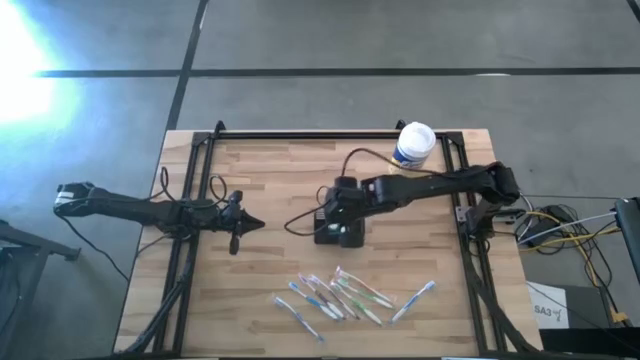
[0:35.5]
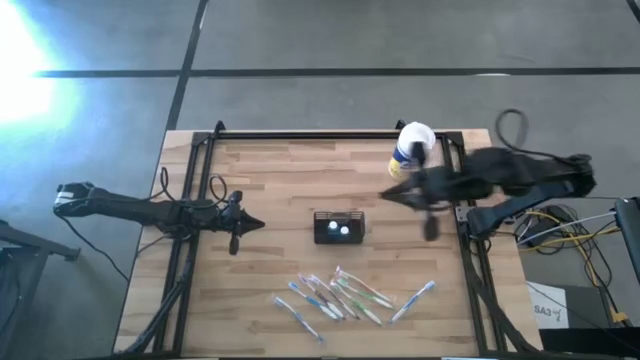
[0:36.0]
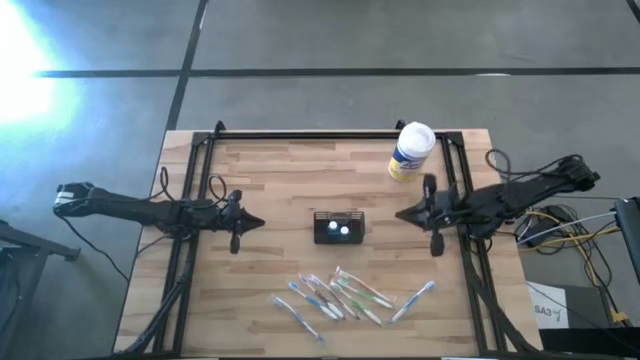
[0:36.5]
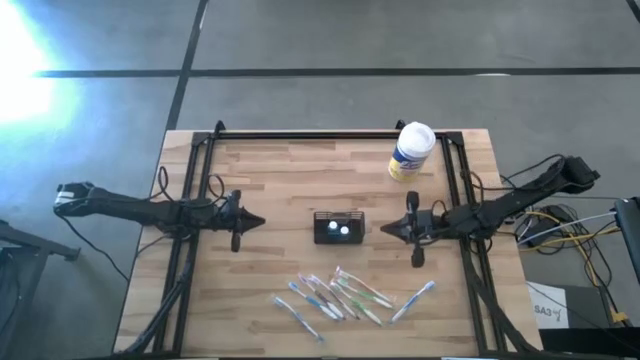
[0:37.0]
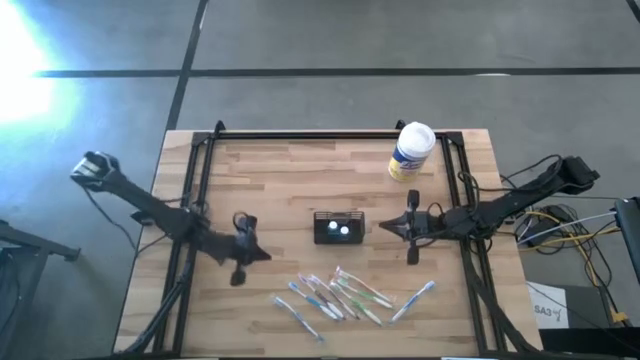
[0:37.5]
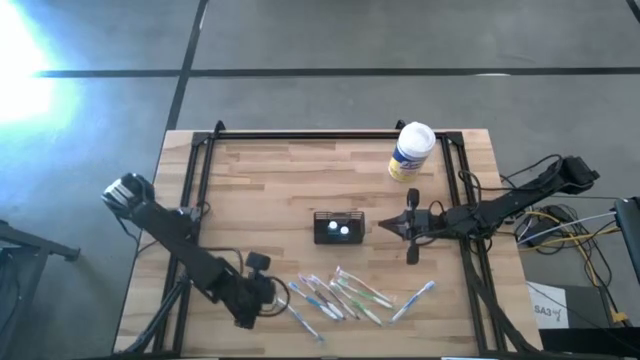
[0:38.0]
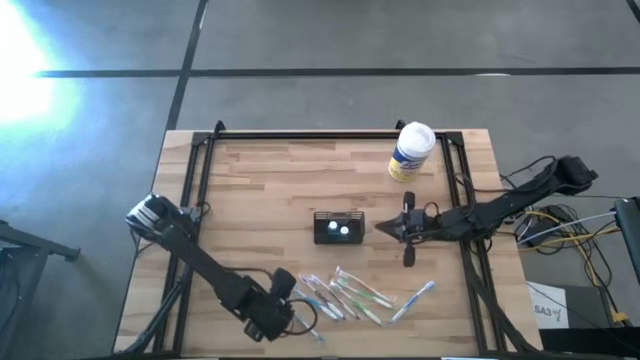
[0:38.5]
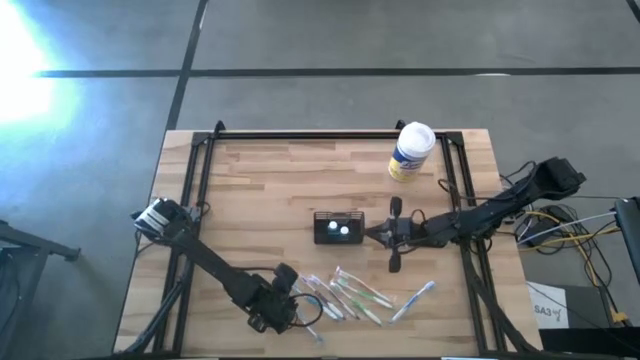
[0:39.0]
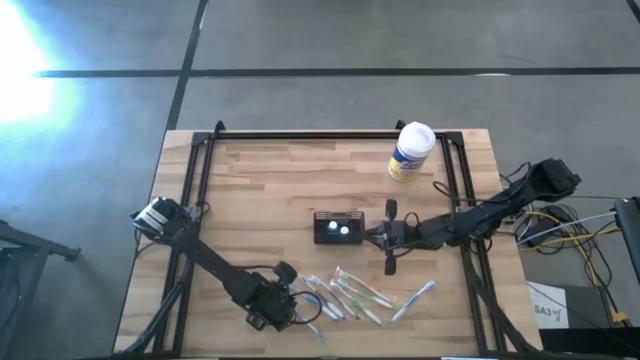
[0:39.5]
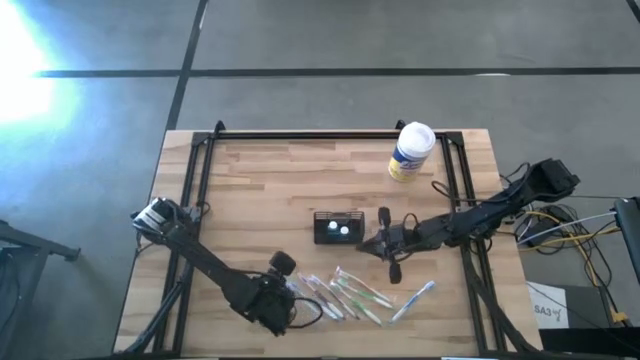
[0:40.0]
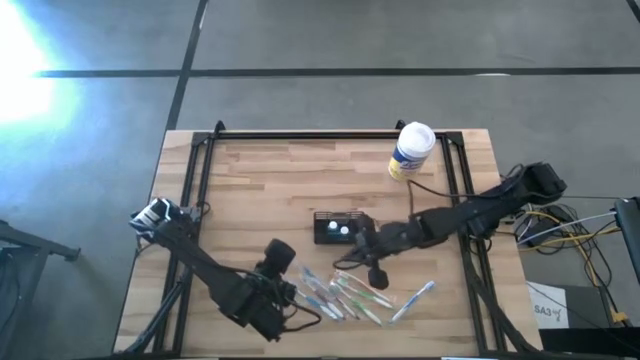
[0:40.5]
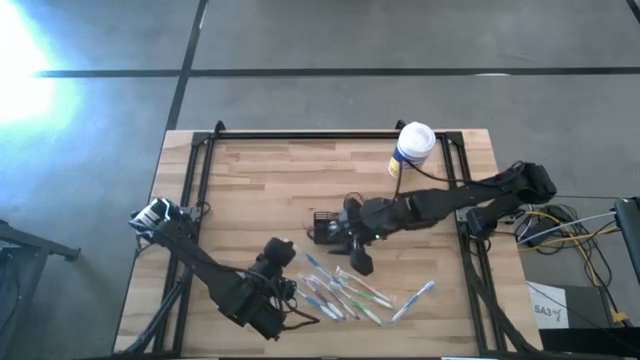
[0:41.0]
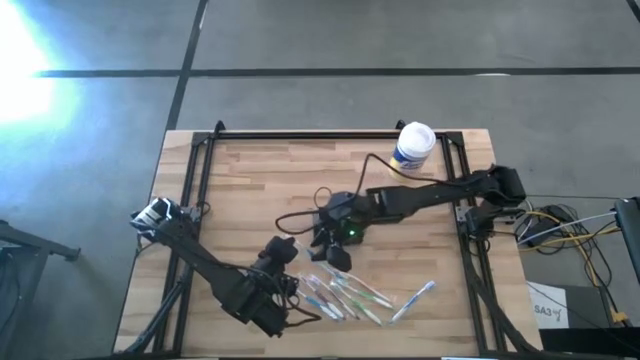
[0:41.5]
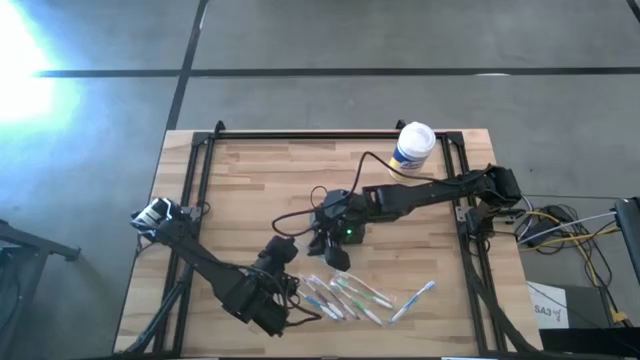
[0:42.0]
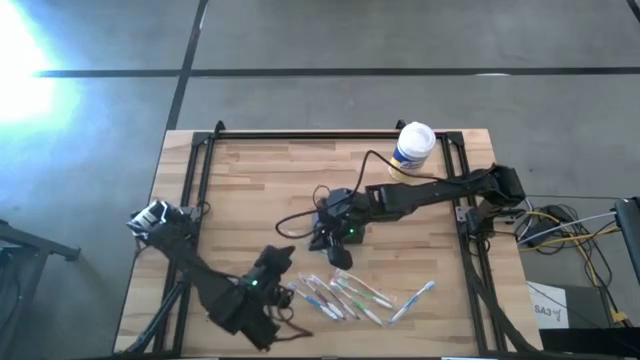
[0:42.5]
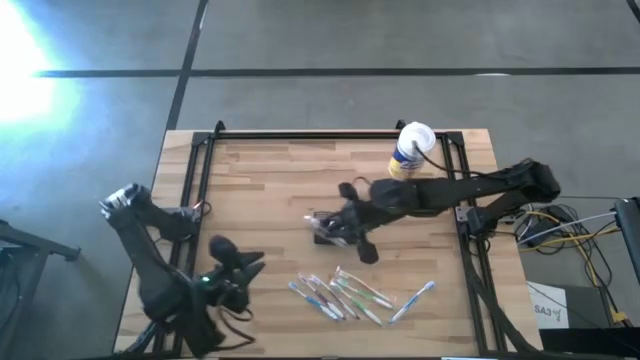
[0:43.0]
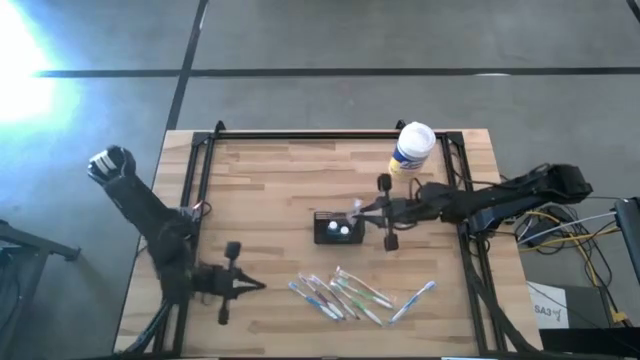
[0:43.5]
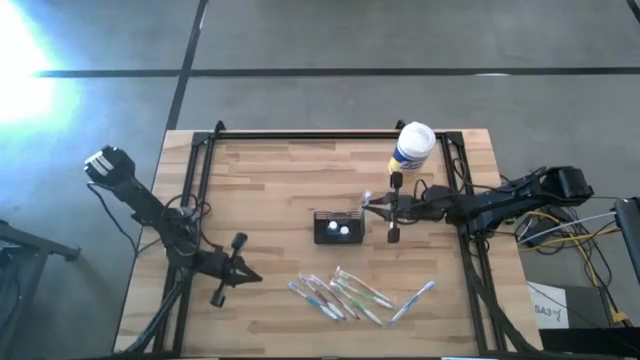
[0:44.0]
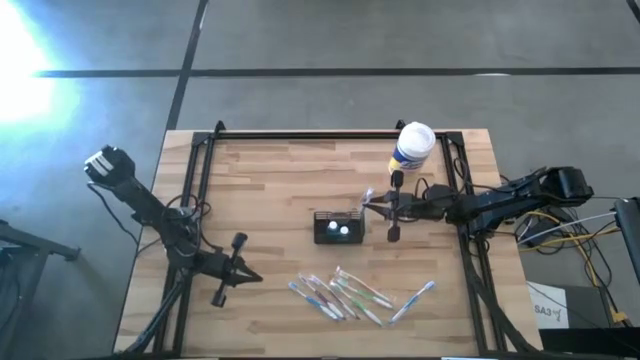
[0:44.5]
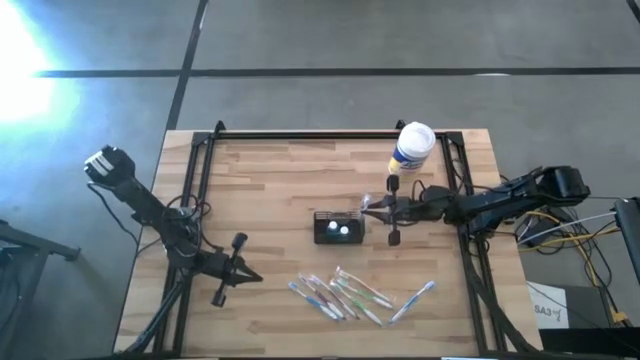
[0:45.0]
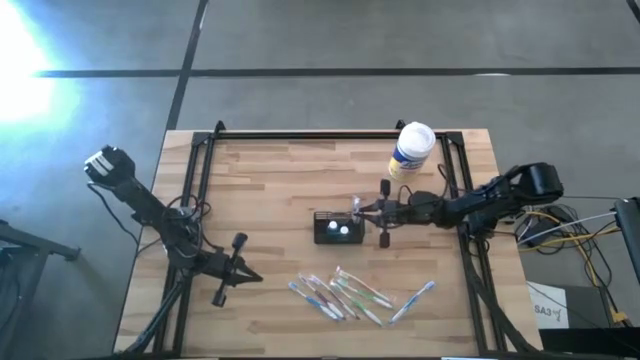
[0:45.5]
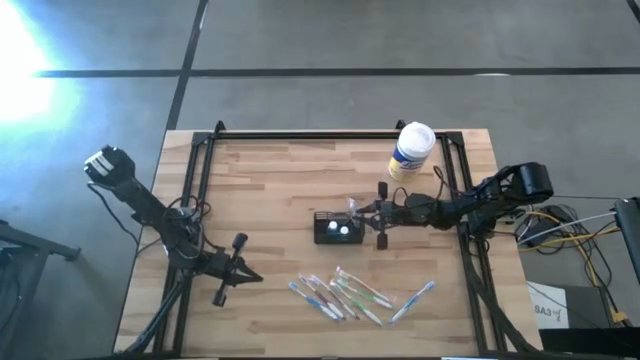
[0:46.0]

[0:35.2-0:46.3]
Task: Pick & Place toothbrushing station
Put the left blue toothbrush into the black mesh organizer

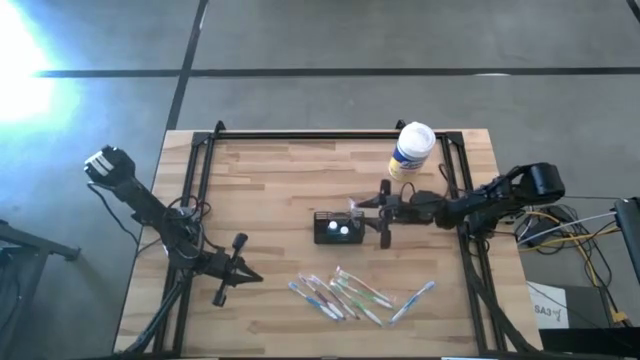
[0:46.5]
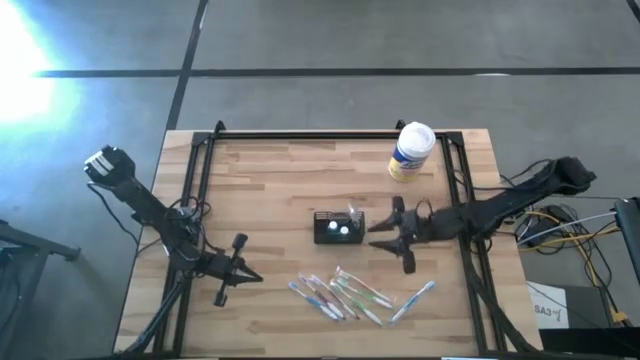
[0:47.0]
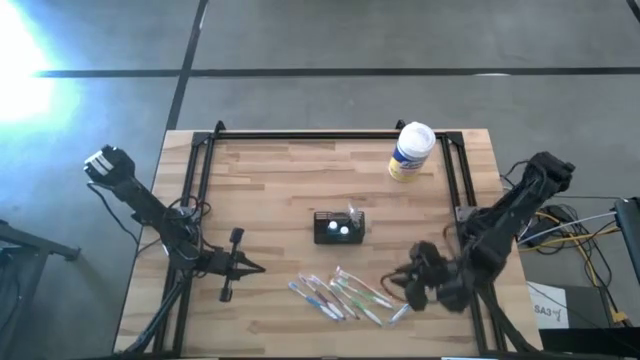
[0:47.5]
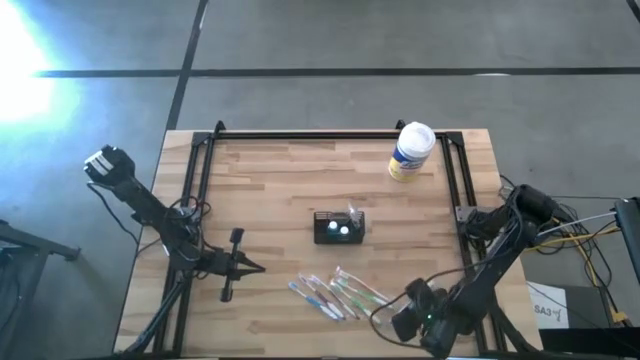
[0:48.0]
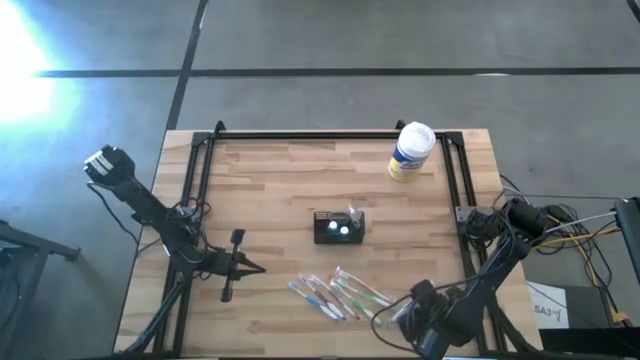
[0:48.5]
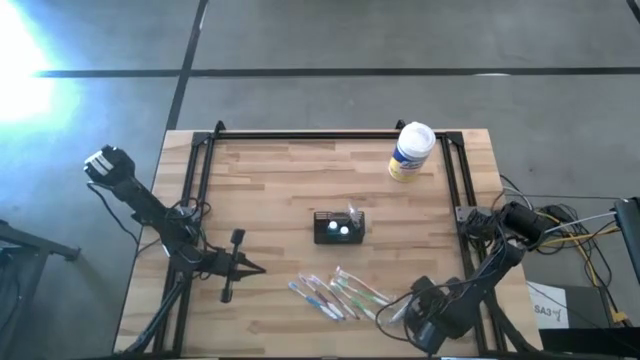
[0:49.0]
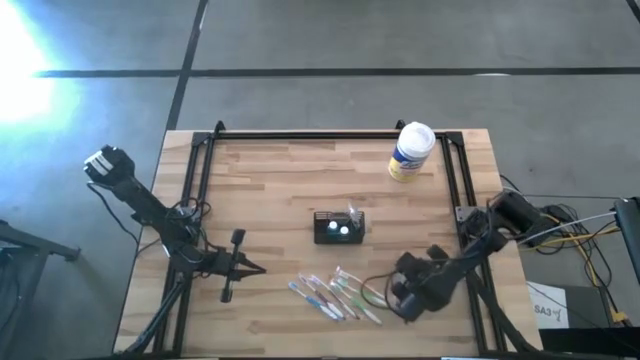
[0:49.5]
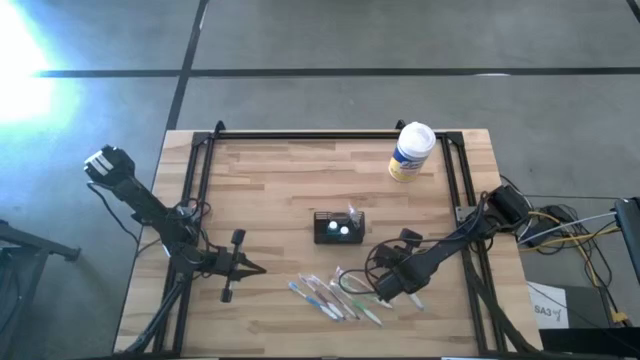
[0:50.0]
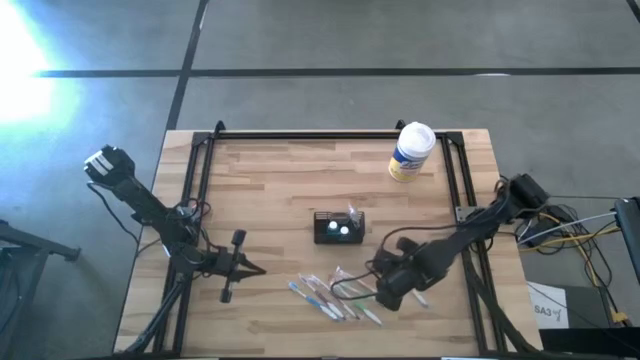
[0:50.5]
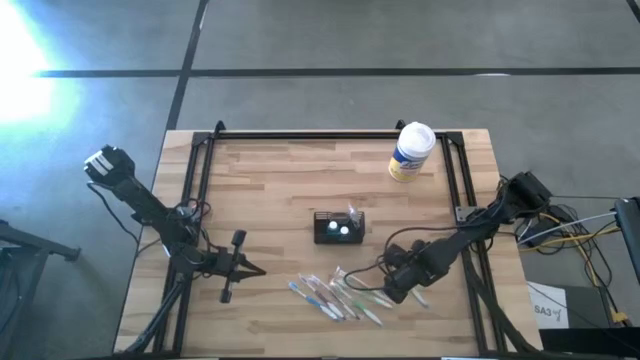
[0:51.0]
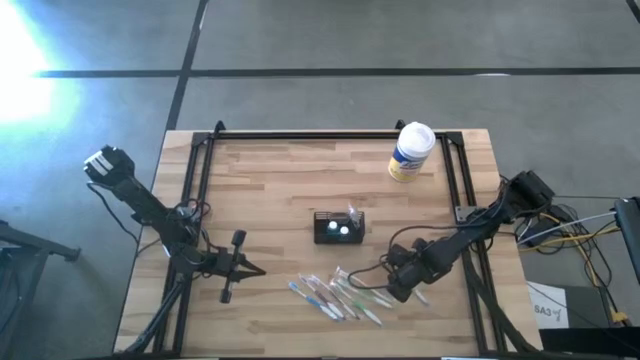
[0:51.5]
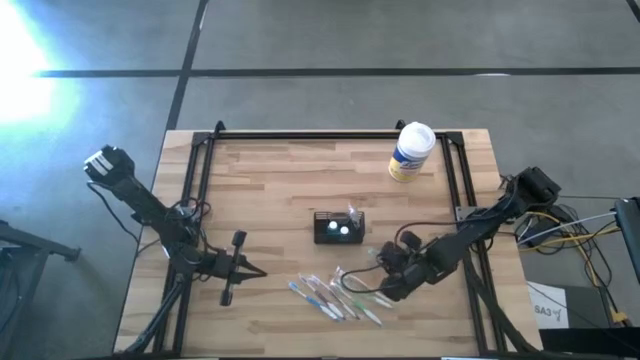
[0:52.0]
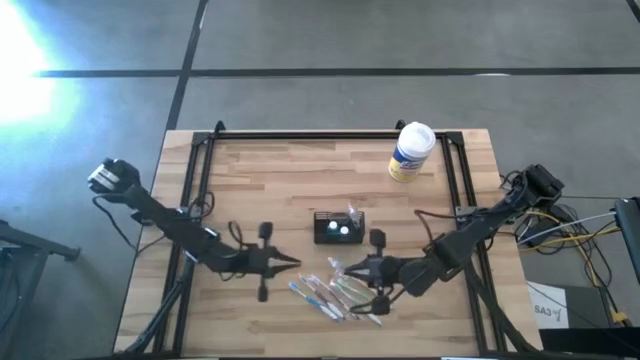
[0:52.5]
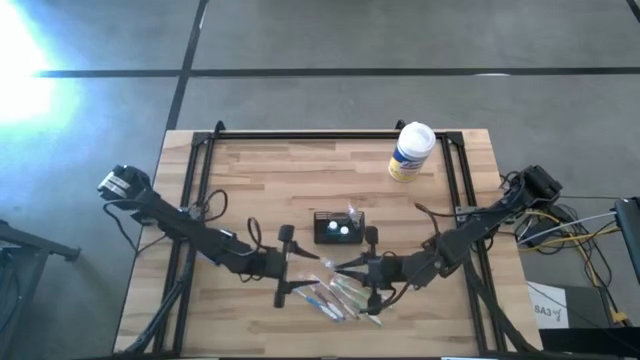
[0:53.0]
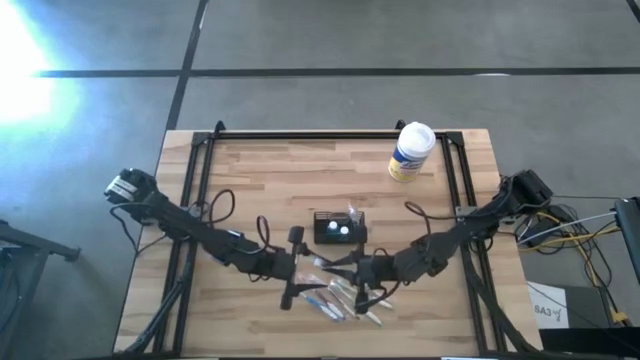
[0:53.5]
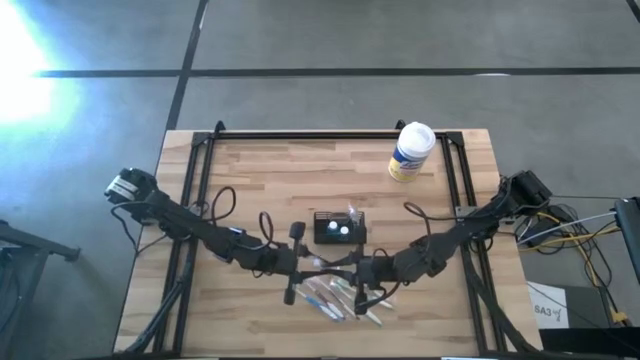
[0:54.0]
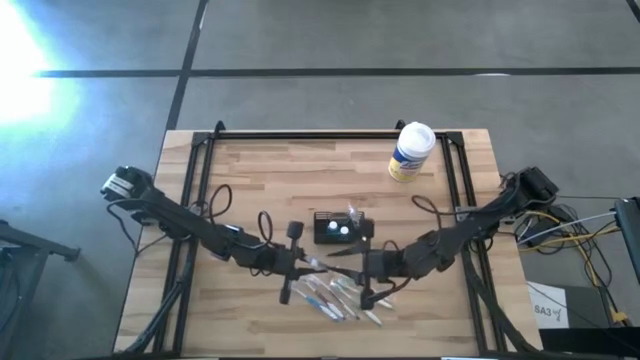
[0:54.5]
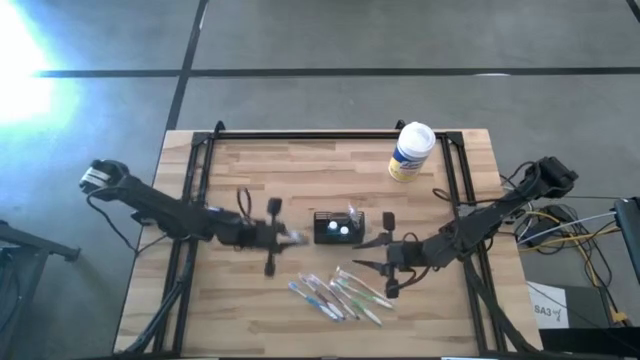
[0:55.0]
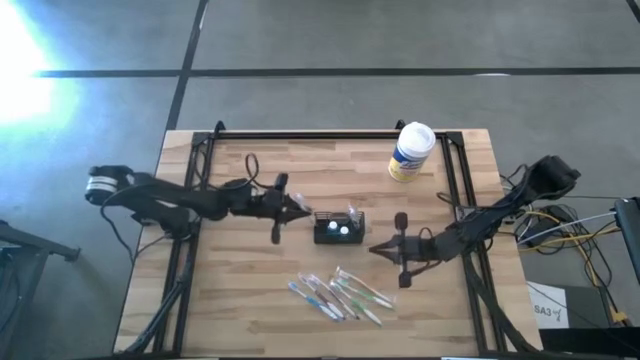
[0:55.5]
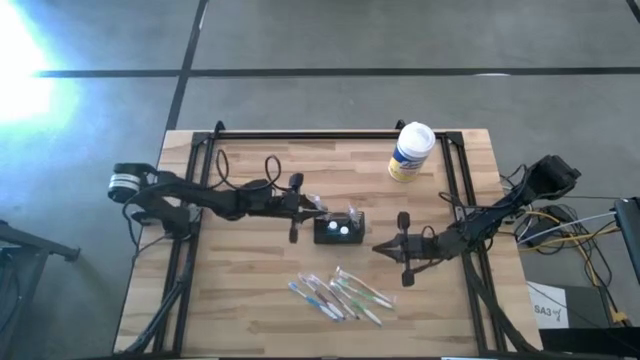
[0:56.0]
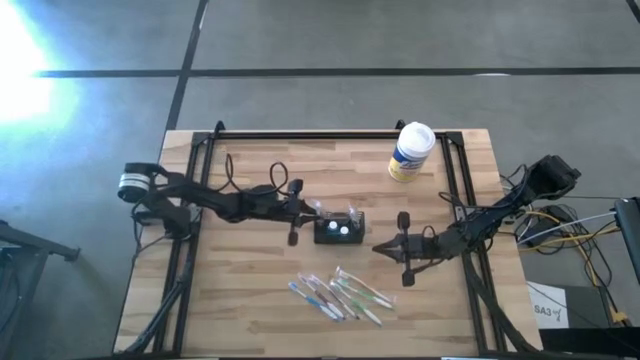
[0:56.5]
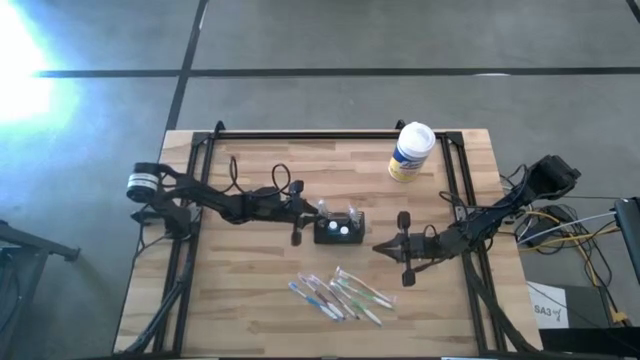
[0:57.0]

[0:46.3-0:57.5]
Put the right blue toothbrush into the black mesh organizer
